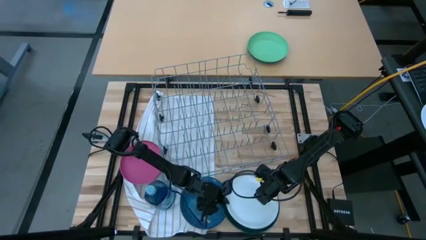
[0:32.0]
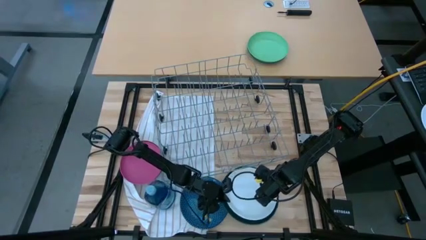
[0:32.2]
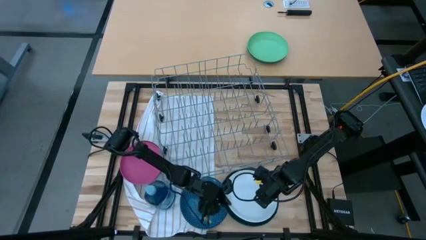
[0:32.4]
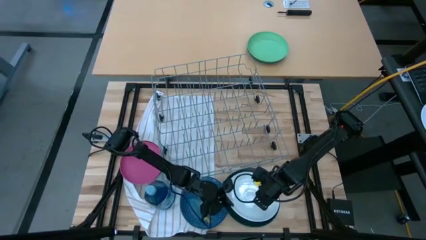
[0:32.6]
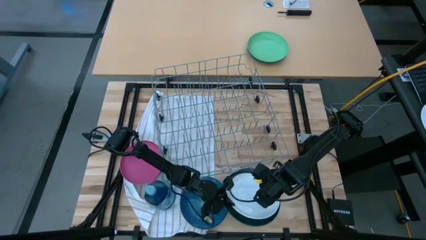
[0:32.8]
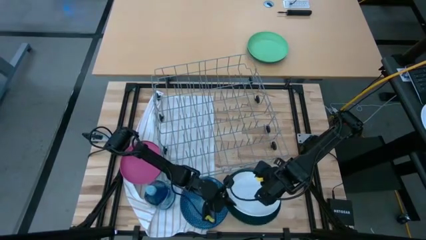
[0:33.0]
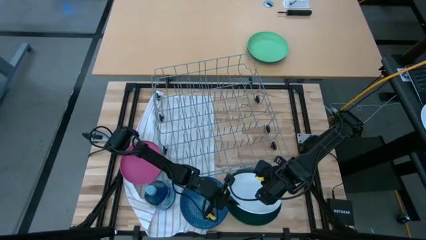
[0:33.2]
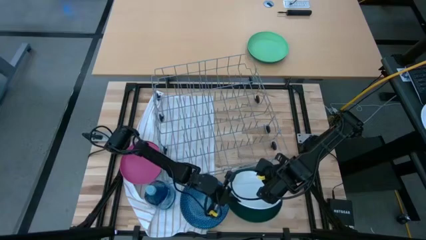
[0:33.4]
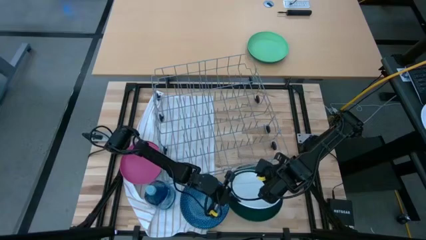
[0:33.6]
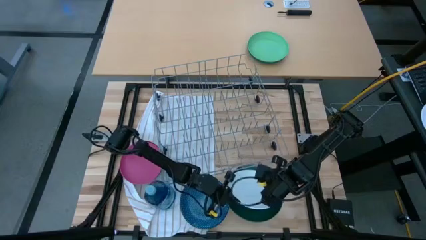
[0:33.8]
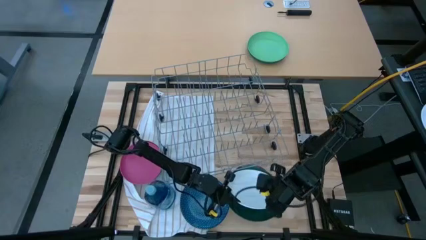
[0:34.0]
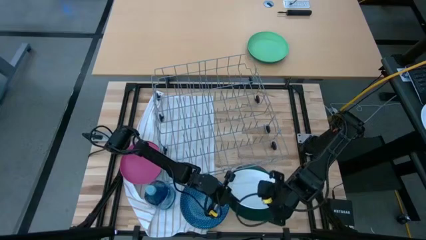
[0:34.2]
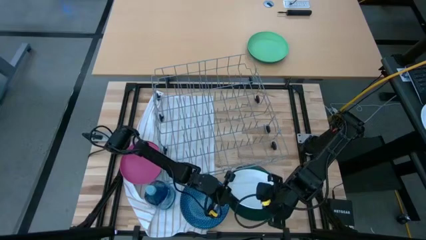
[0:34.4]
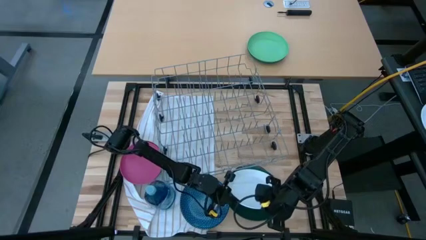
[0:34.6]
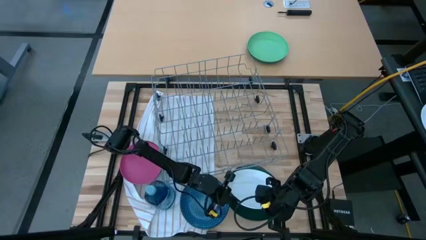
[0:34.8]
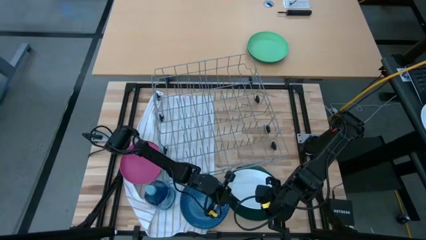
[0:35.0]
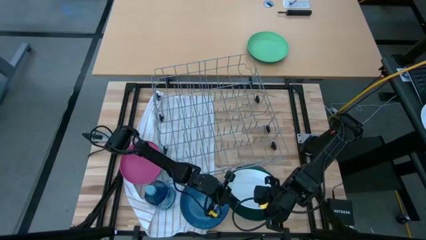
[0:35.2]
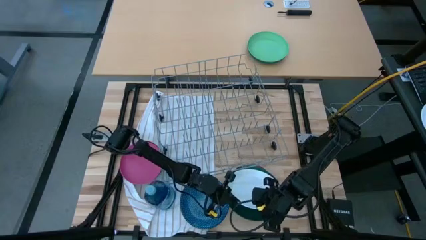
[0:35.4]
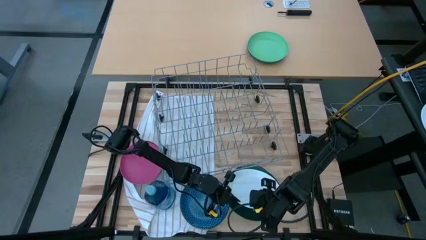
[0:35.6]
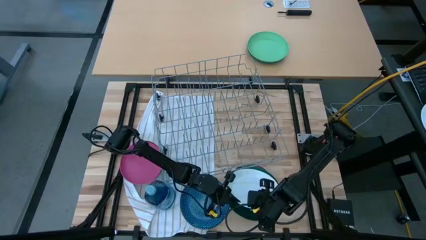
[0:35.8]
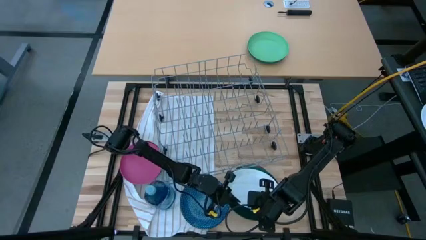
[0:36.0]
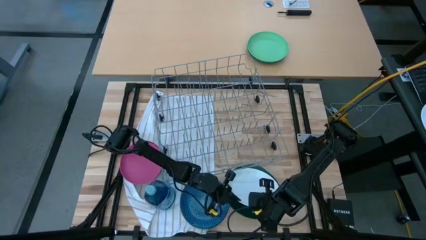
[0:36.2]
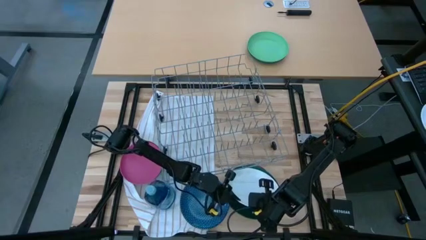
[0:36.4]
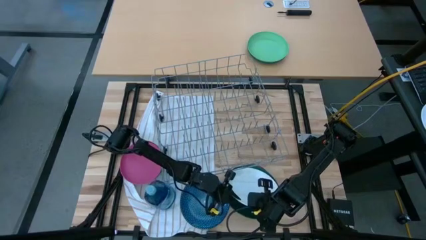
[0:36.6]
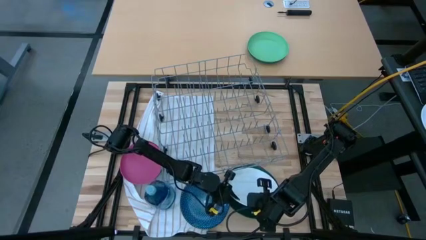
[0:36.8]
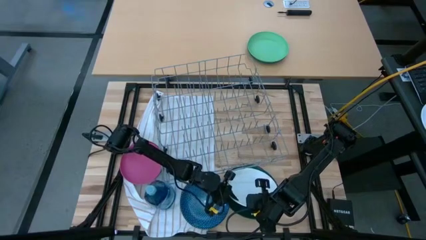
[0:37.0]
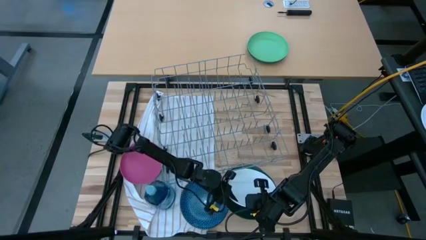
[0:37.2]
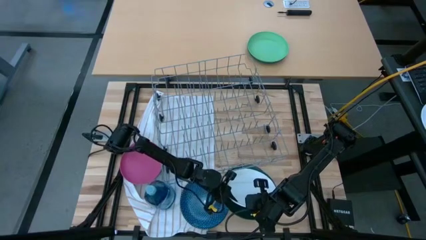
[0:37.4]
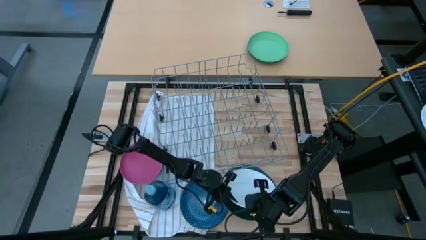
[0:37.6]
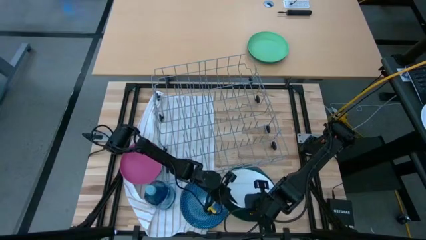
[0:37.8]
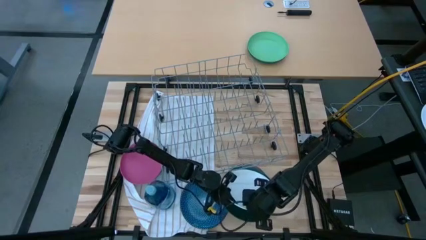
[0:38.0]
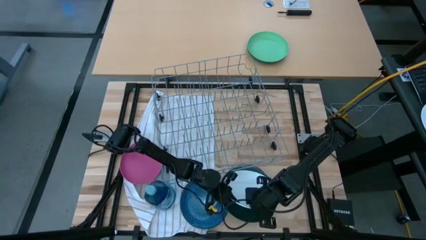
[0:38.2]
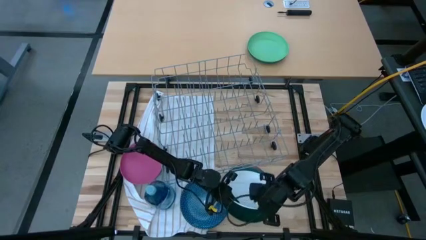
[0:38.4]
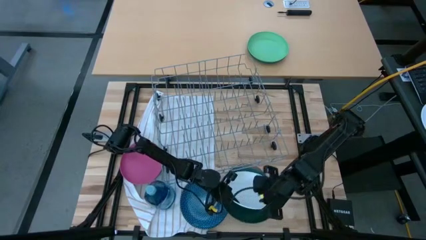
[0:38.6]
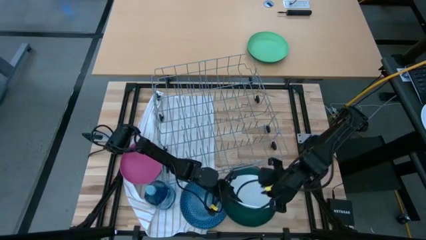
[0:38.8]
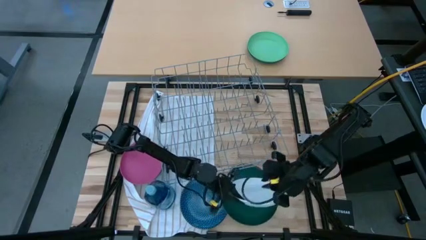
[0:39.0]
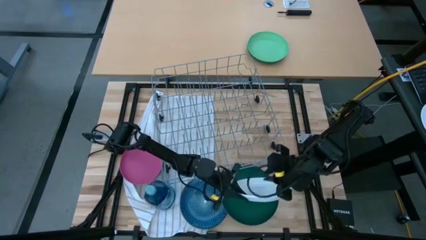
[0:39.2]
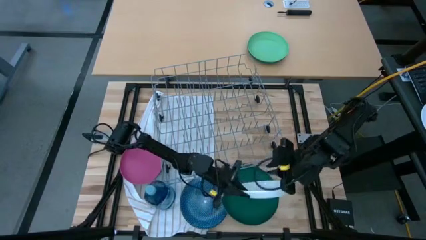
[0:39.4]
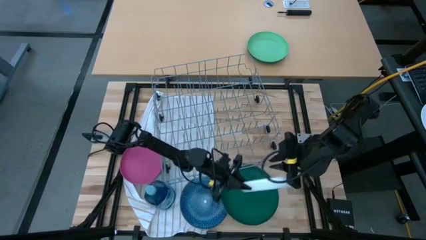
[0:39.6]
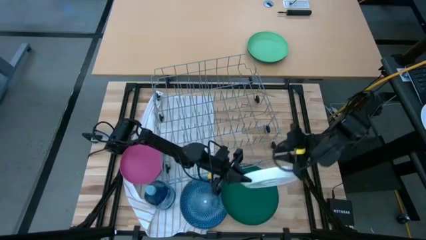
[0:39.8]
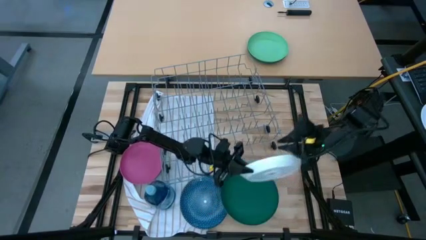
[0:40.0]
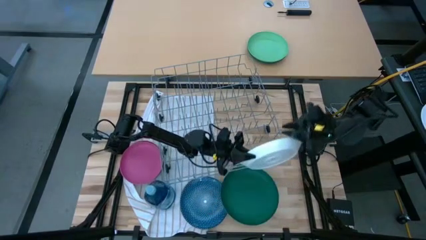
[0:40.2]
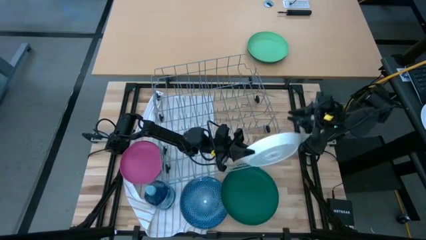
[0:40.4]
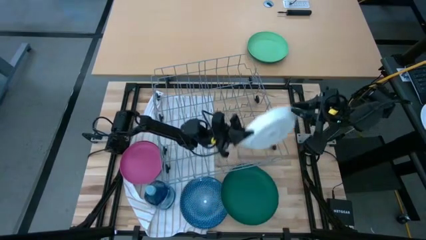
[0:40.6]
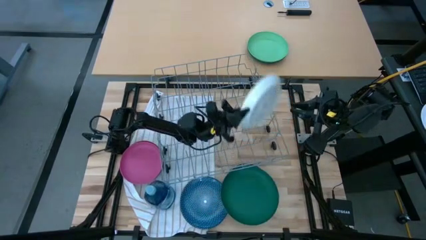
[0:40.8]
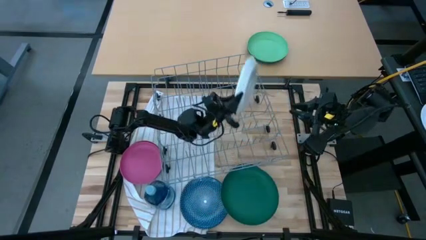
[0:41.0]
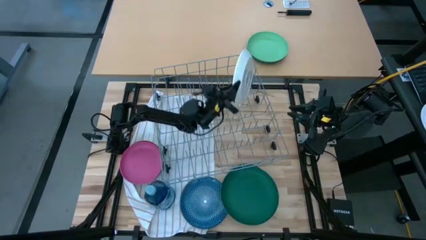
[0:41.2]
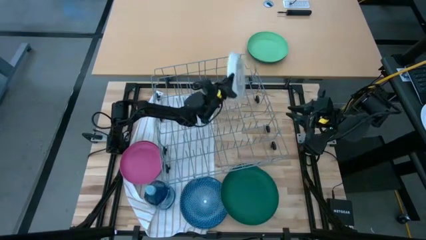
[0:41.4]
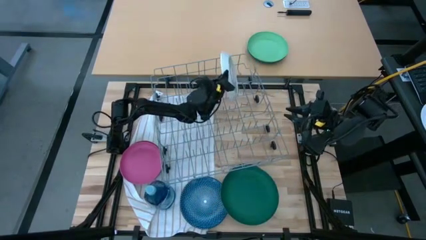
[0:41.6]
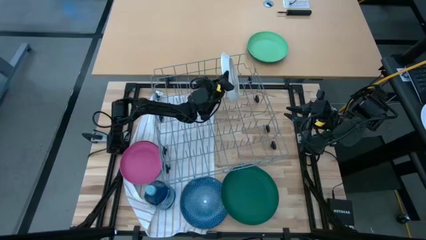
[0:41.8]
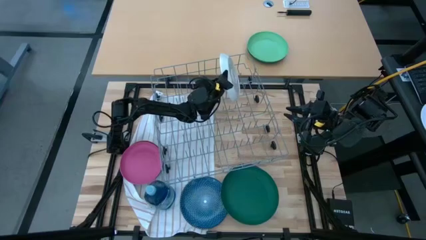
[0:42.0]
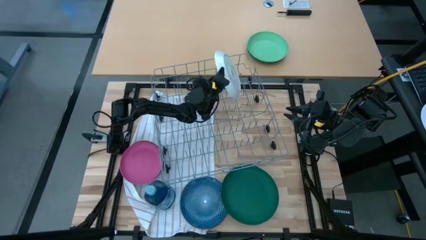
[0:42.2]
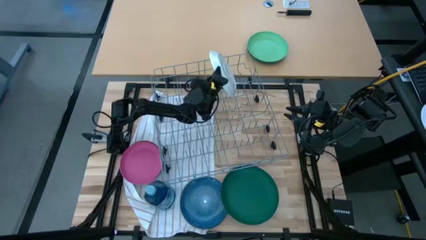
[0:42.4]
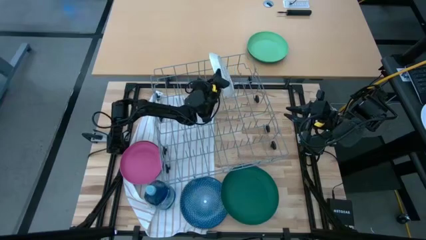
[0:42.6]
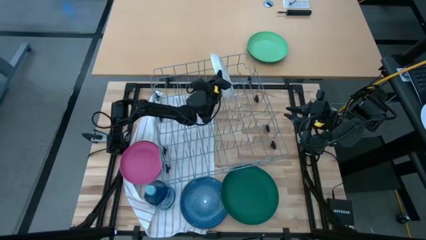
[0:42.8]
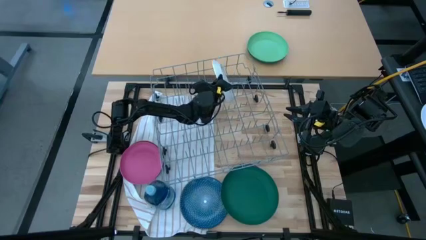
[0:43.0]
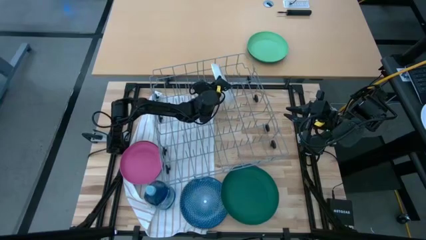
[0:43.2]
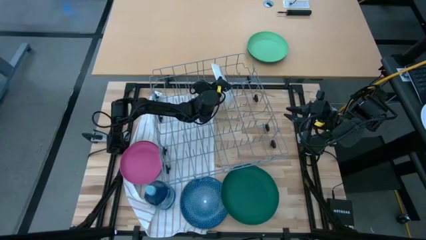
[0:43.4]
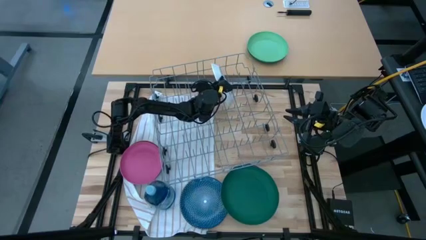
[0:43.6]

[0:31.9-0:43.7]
Task: Sort dishes
Put the white plate into the dish rack
